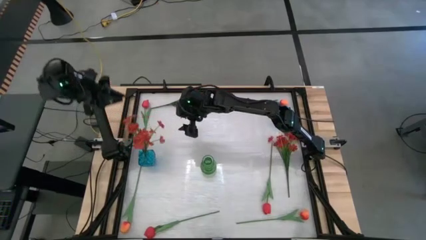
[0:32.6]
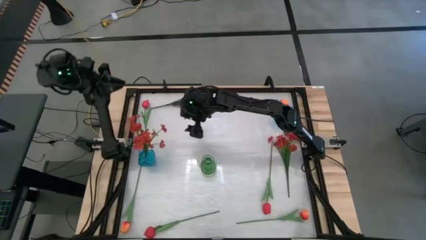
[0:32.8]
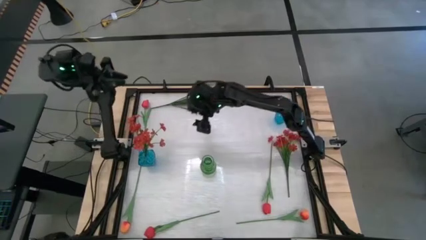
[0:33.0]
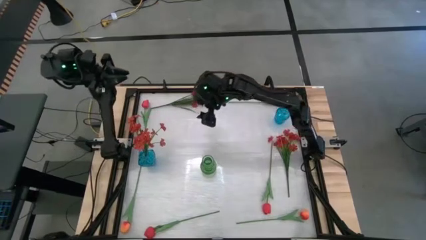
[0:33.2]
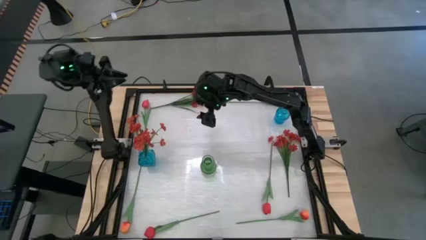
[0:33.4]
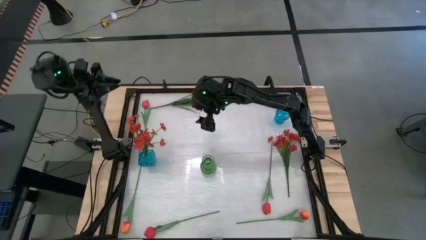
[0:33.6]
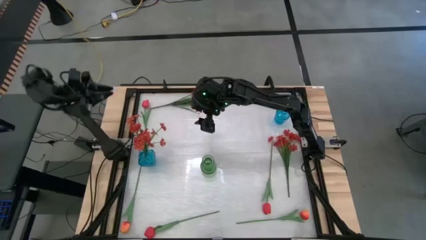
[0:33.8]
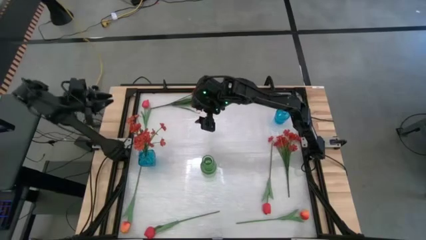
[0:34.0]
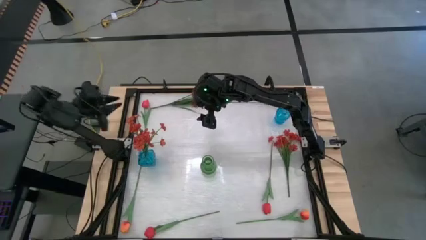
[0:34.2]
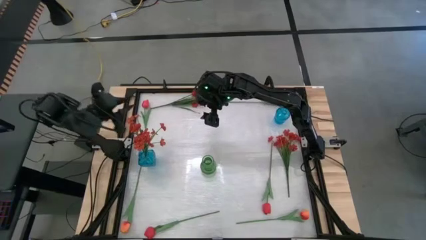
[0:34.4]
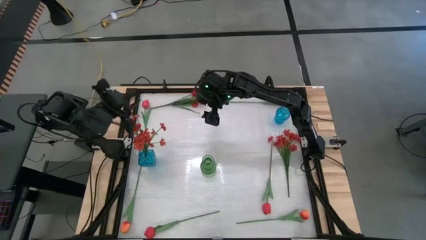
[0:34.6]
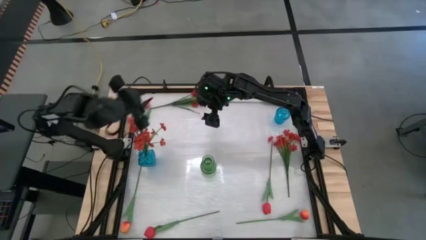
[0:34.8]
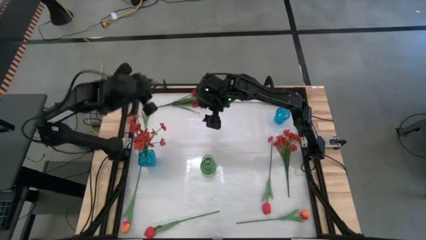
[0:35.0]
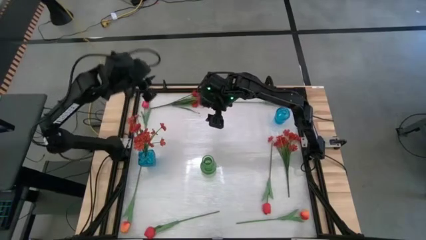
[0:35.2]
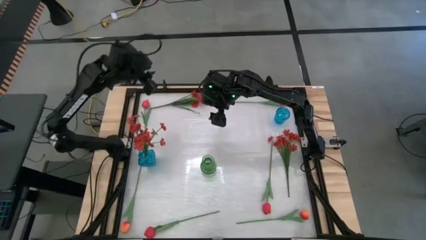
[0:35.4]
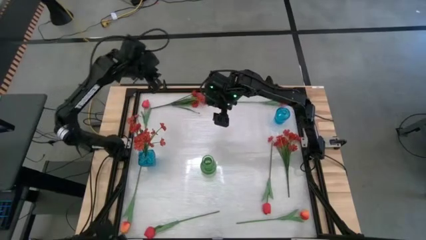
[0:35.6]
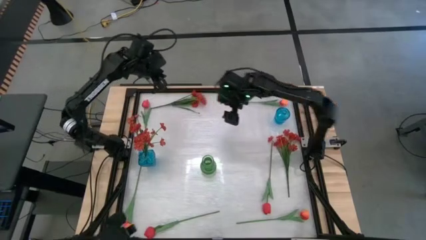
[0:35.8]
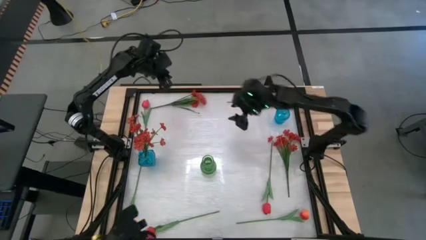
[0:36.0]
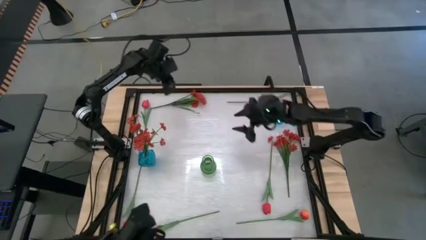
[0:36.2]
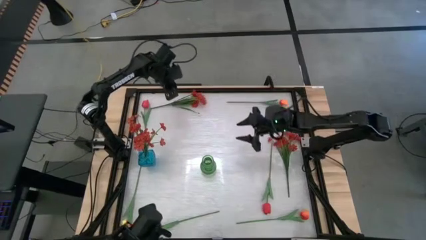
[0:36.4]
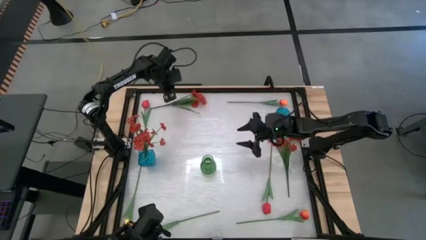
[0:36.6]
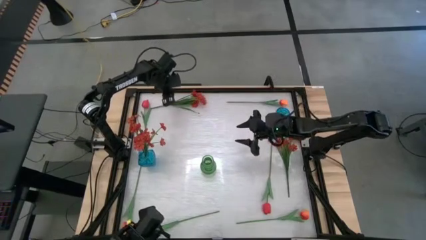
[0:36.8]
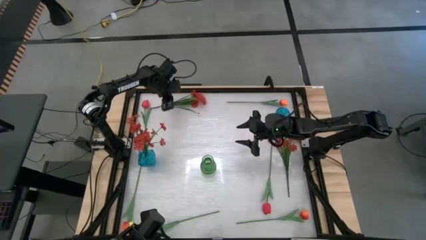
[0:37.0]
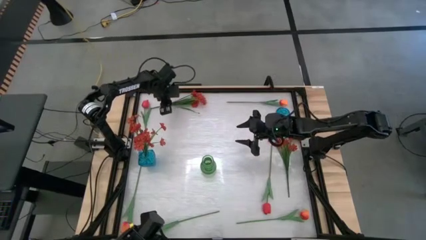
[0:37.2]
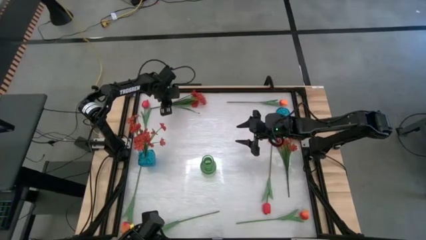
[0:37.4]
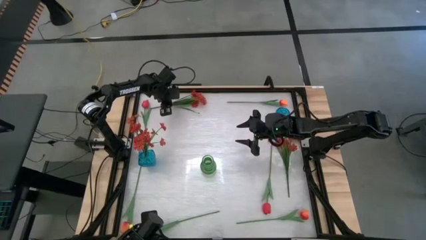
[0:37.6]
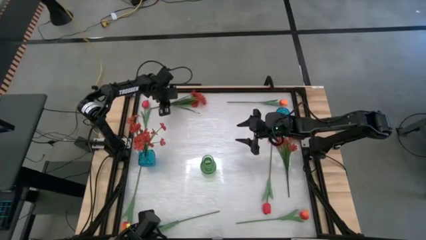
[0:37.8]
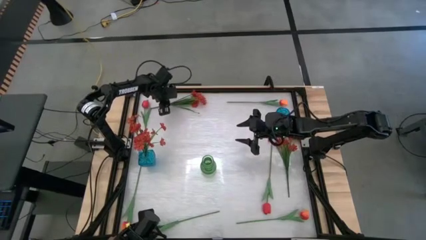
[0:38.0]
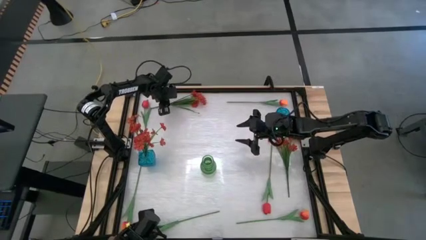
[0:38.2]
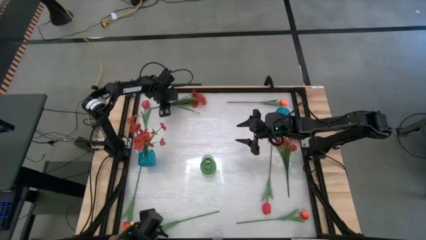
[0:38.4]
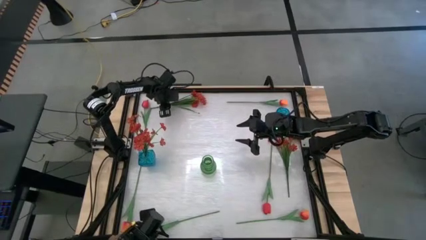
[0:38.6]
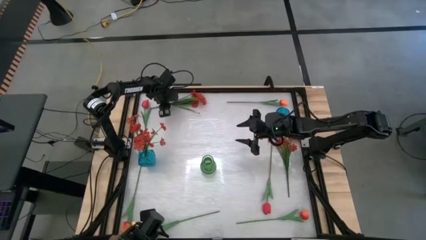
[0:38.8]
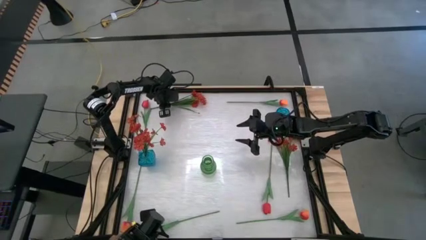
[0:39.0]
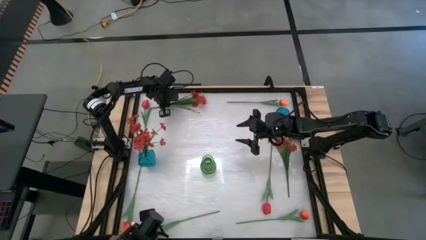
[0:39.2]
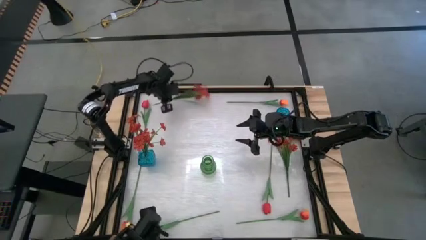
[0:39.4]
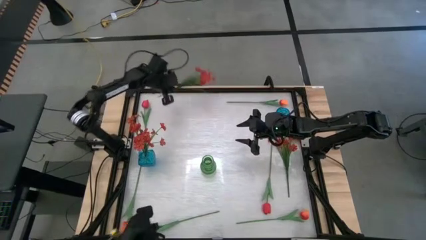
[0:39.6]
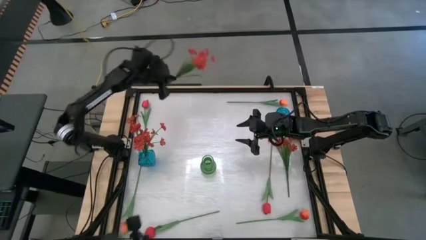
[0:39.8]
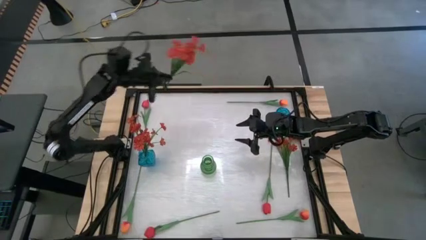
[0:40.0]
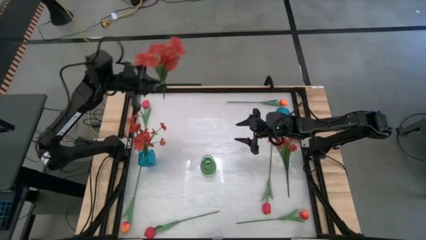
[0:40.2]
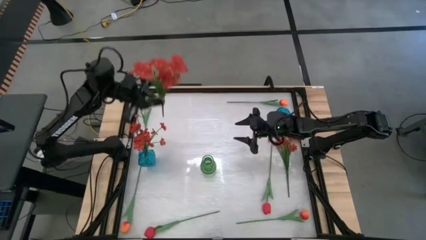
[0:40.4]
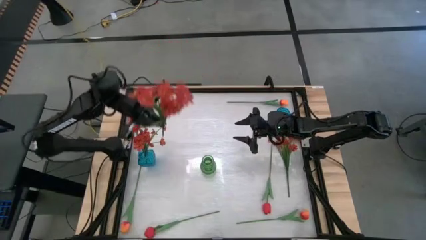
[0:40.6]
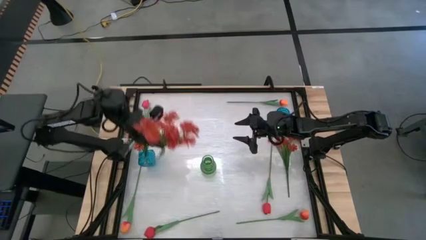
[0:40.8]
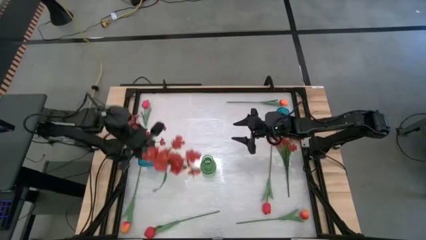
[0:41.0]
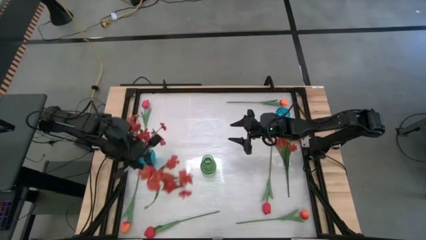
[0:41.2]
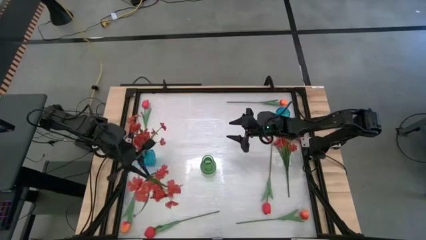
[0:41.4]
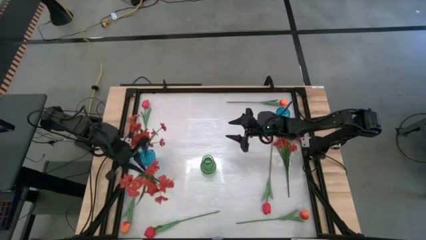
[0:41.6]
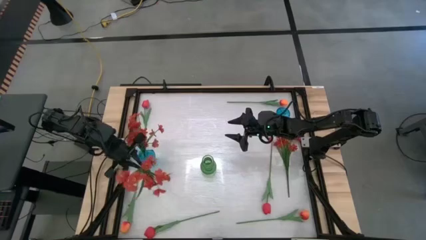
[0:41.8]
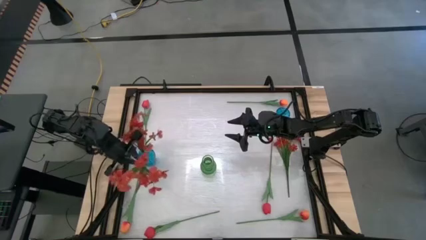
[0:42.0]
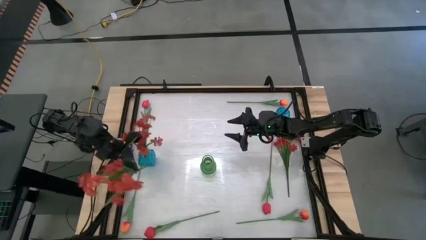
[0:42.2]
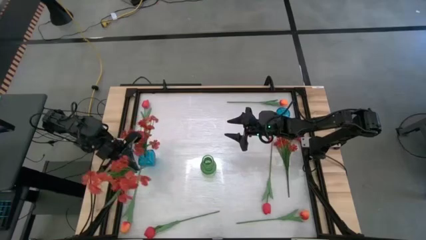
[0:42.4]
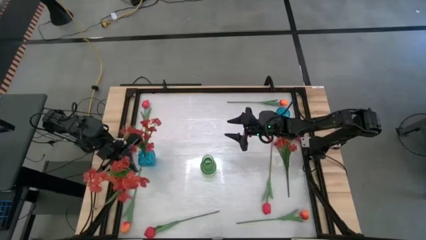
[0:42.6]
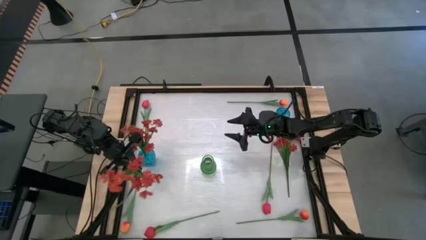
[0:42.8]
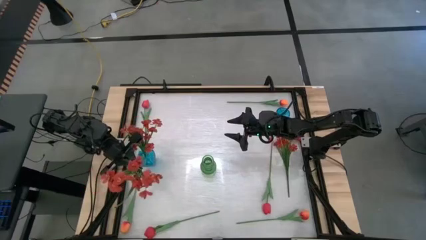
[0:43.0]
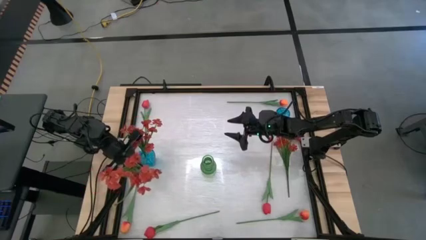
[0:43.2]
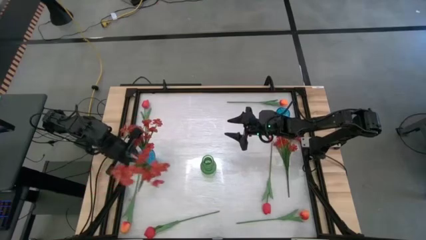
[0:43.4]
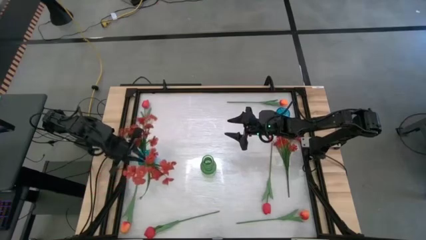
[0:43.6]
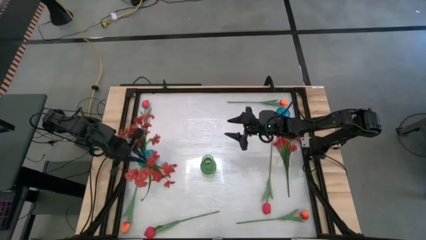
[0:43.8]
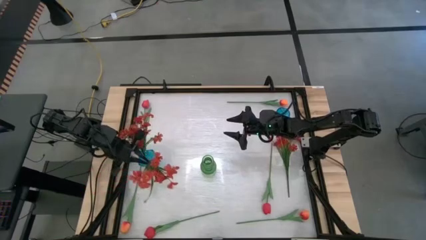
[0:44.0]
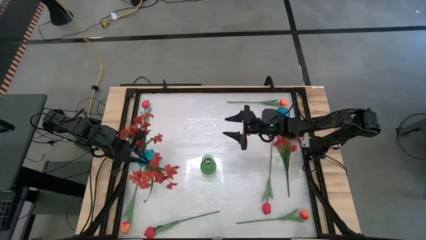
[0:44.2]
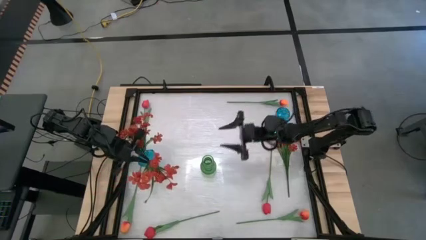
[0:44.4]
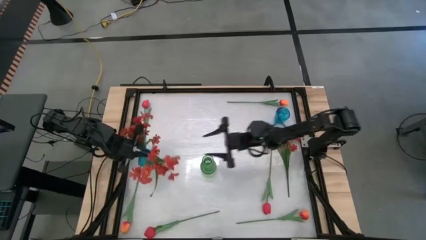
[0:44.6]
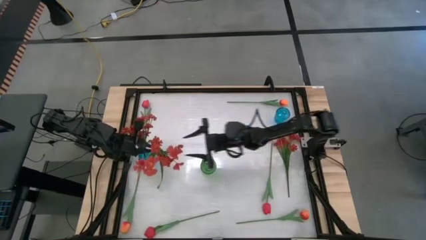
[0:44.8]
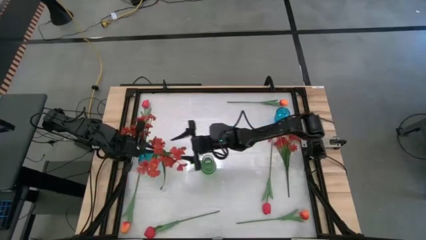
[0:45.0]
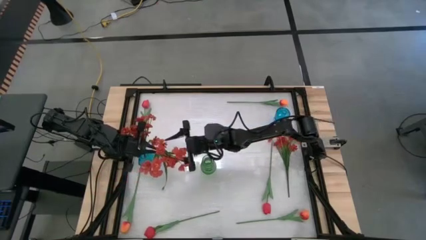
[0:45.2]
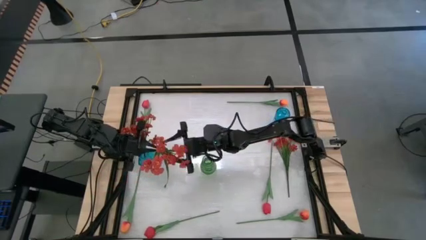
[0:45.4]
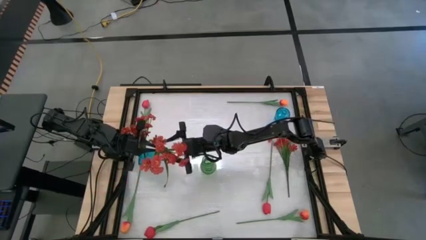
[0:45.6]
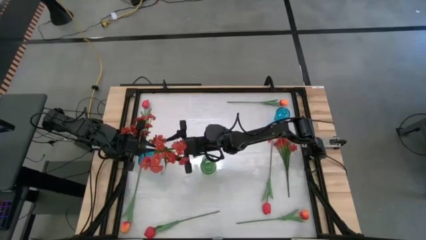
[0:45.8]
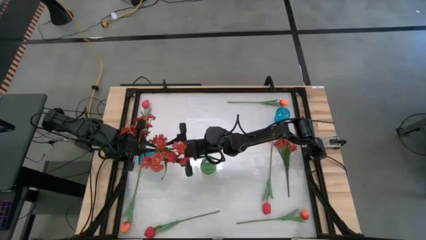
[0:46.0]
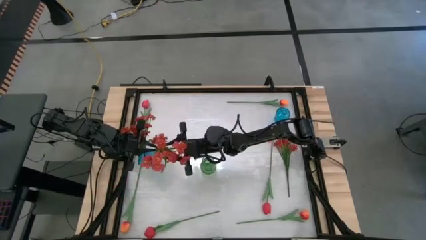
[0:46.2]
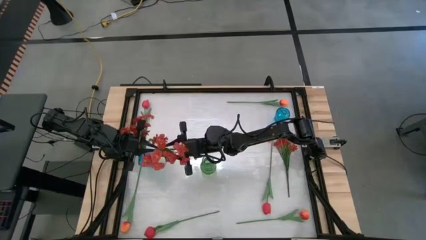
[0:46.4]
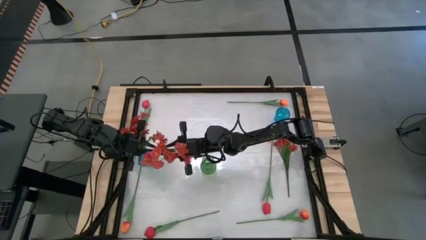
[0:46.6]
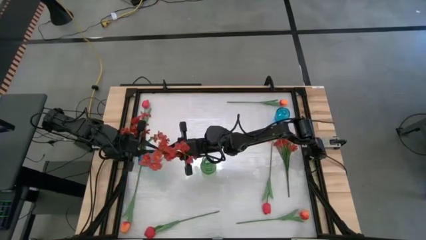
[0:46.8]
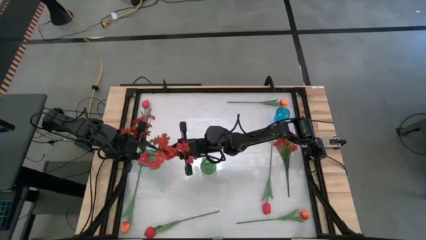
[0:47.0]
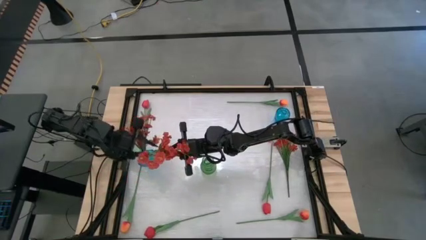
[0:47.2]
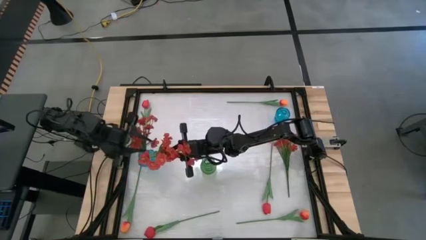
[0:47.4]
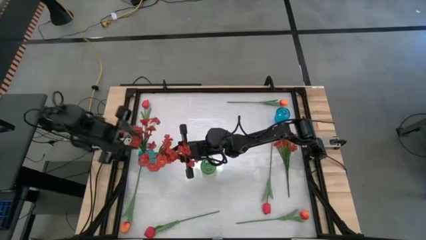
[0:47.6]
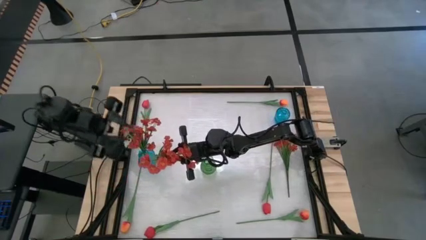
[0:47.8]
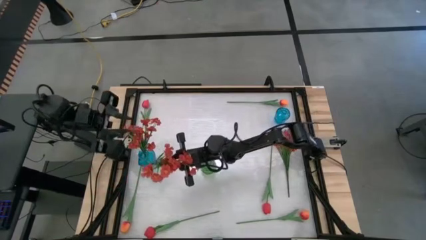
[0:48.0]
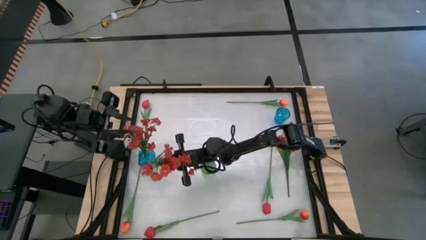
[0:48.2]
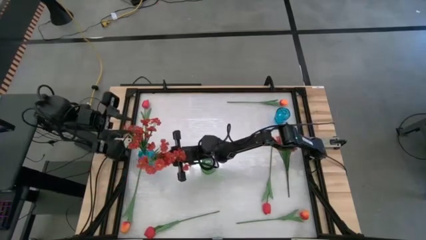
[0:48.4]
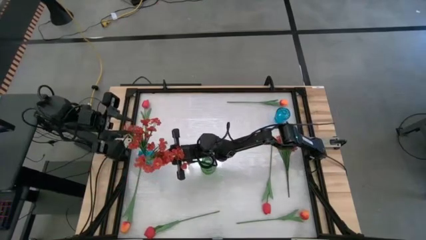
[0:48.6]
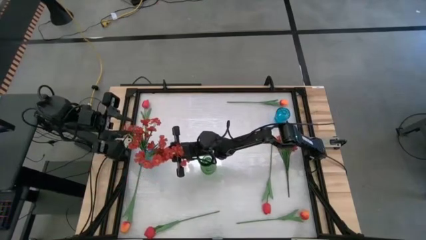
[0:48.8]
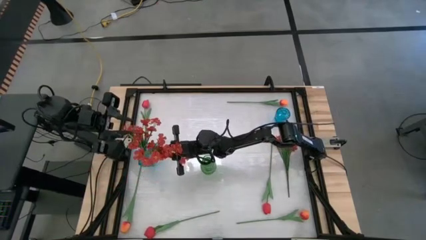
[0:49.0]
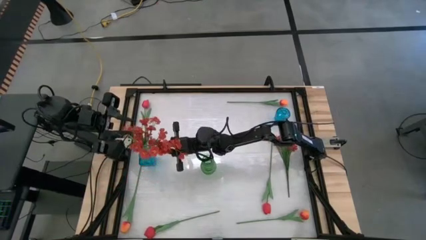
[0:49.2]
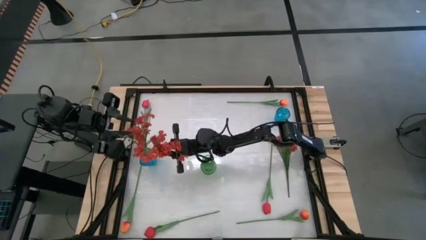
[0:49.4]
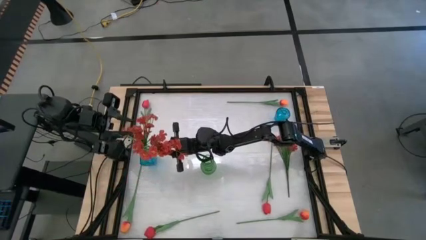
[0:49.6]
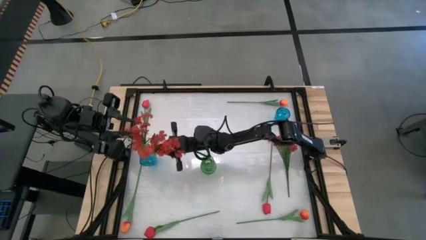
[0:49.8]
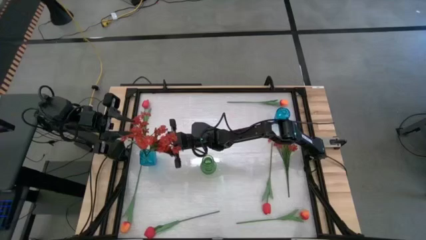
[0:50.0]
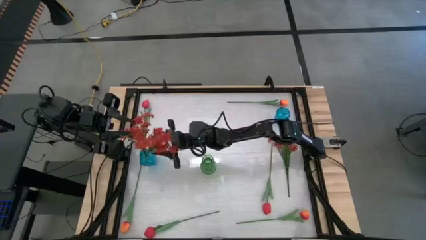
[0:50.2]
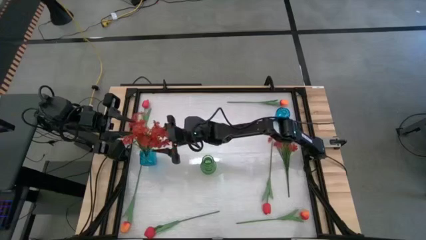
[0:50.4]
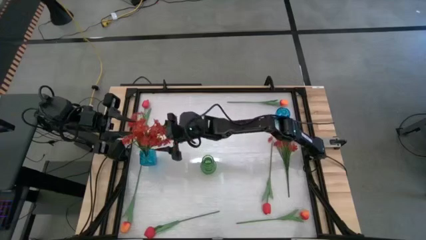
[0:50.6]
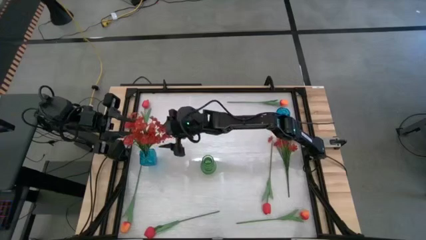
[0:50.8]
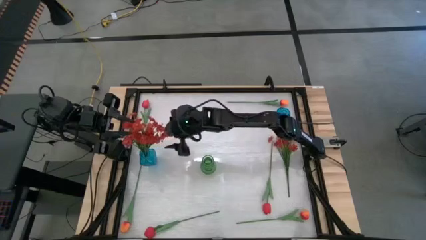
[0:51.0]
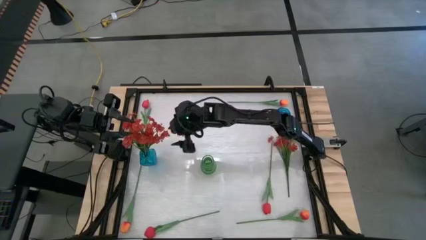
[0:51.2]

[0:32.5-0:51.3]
Task: Sort flowers into vase by color
Put the top red flowers into the left blue vase
